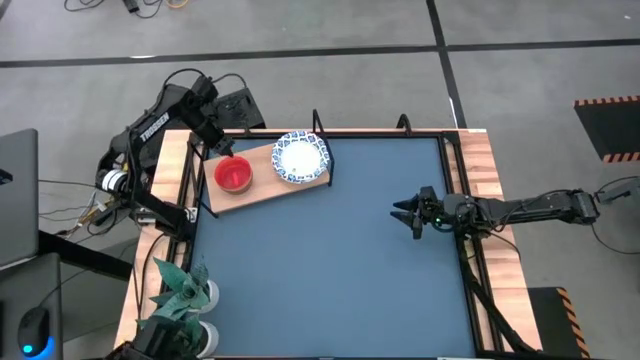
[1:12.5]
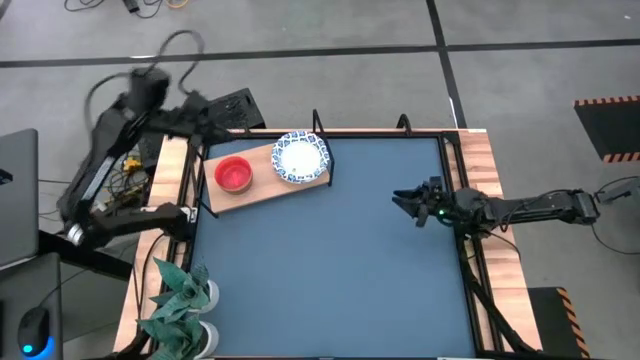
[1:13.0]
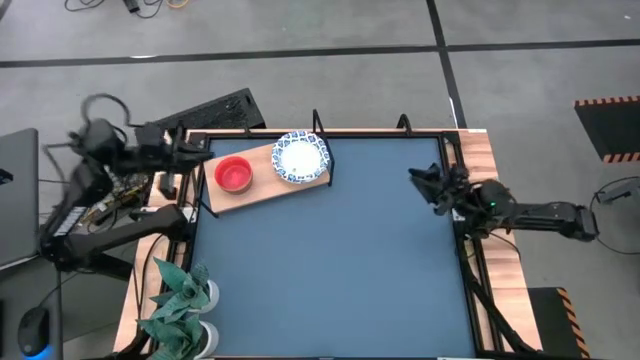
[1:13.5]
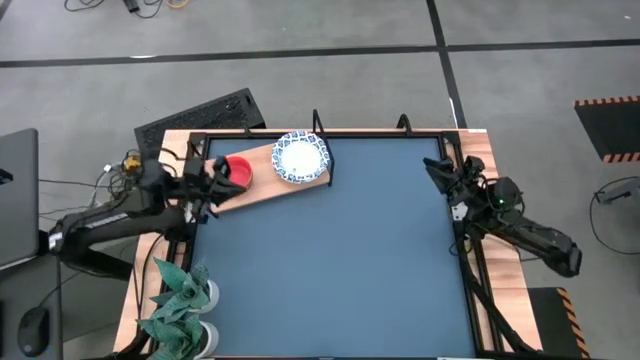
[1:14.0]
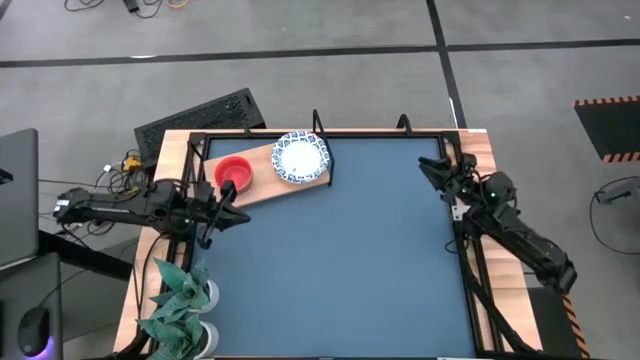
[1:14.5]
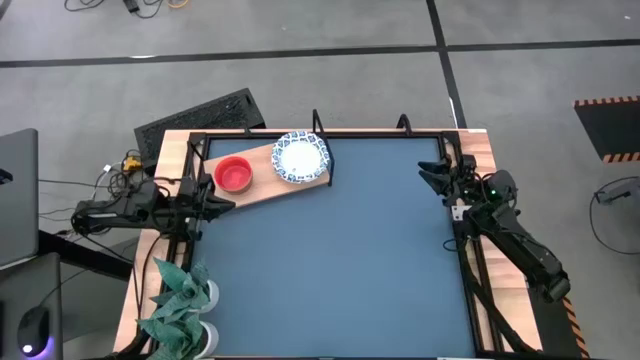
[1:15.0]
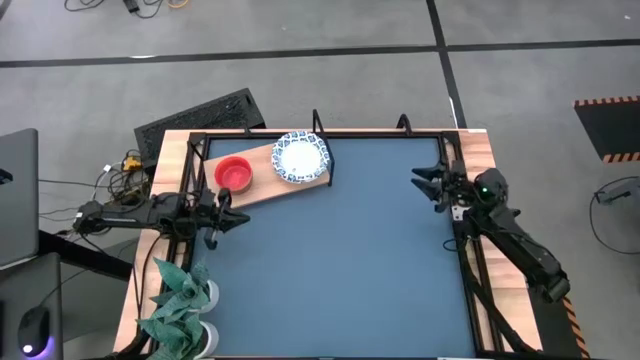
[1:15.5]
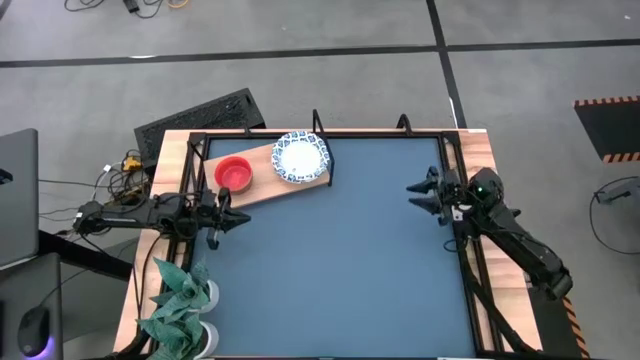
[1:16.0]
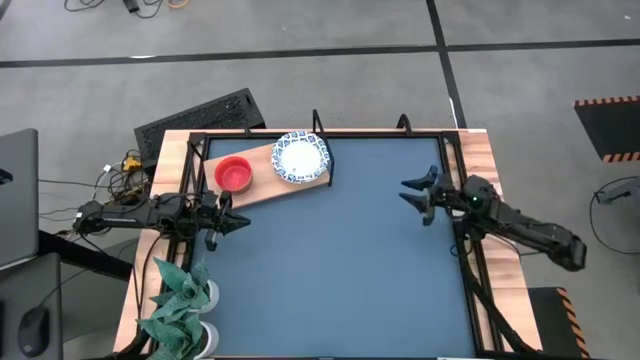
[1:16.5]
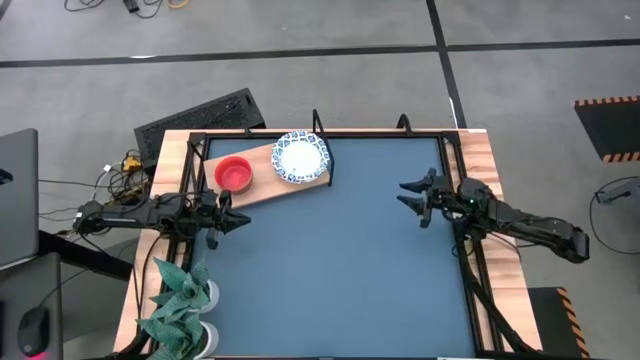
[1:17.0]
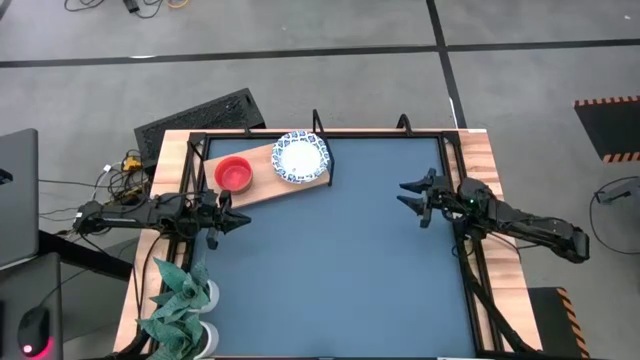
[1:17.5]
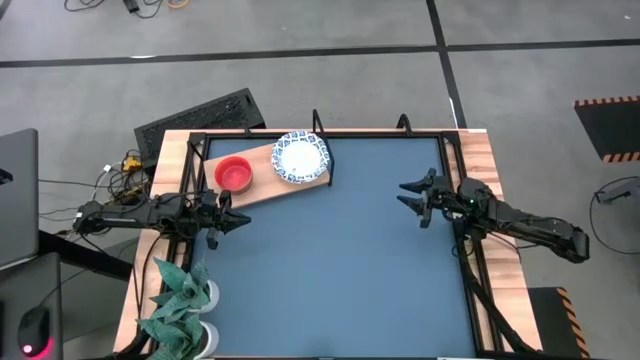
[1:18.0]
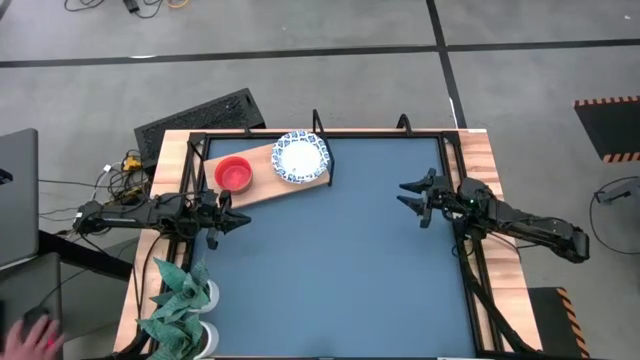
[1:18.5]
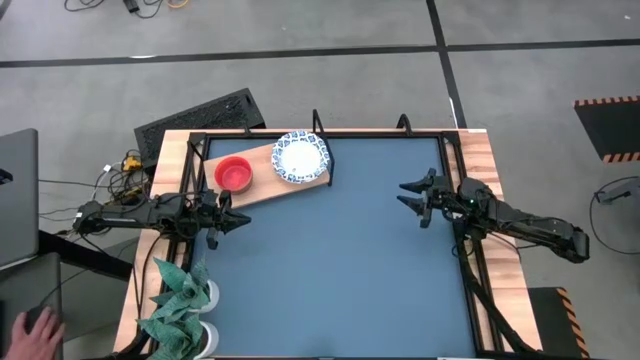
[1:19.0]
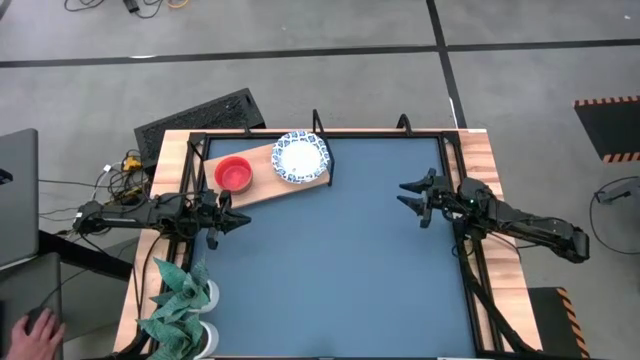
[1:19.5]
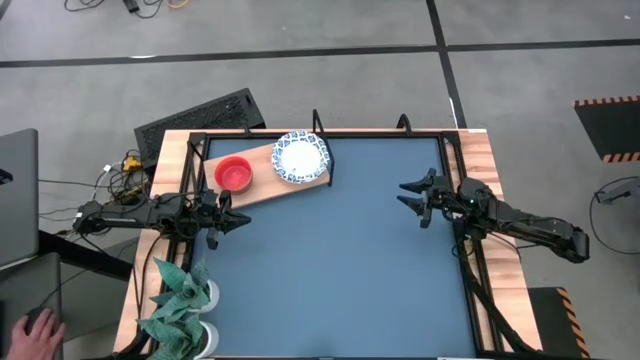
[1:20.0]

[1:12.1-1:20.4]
Task: Place and stack bowls onto a shelf
Return to Home Position

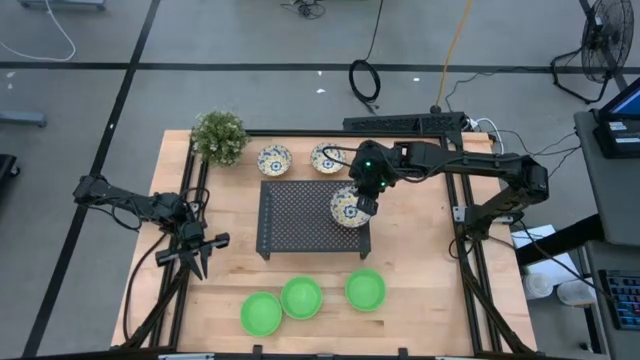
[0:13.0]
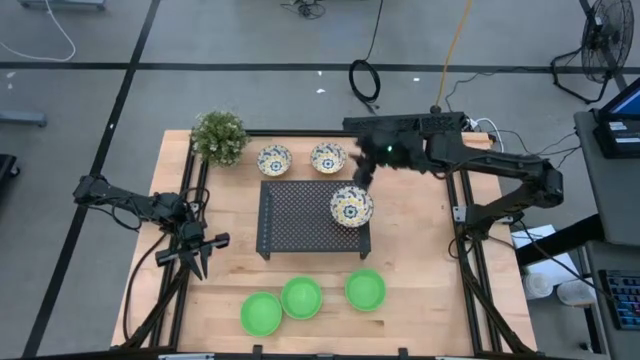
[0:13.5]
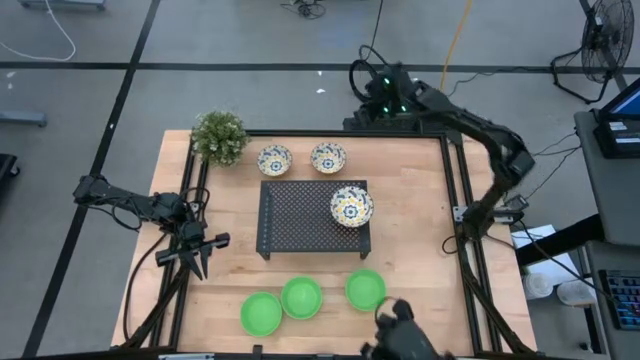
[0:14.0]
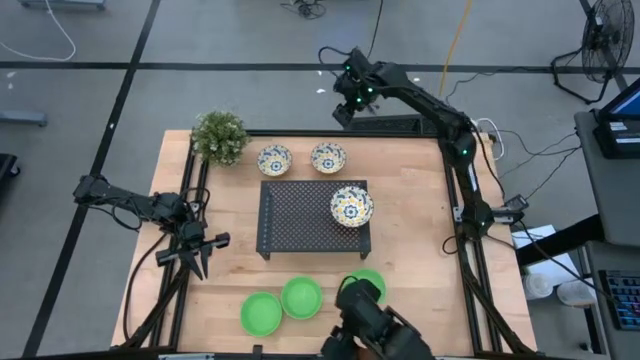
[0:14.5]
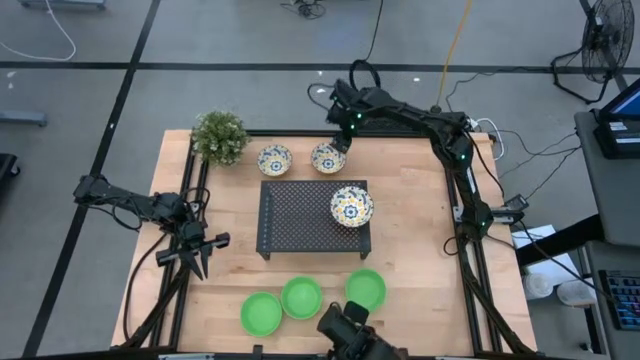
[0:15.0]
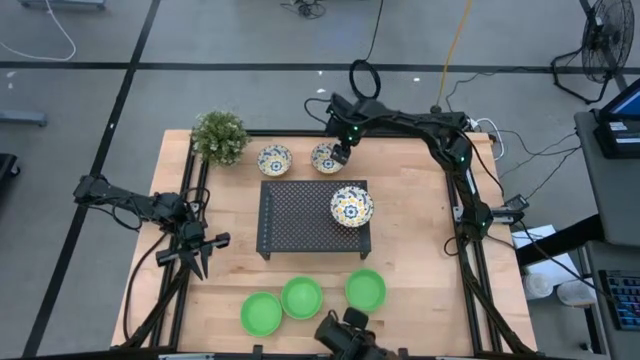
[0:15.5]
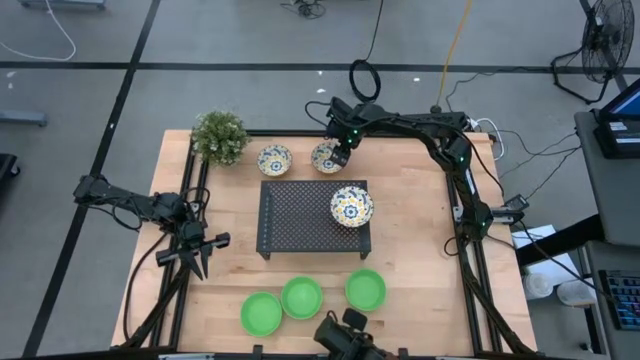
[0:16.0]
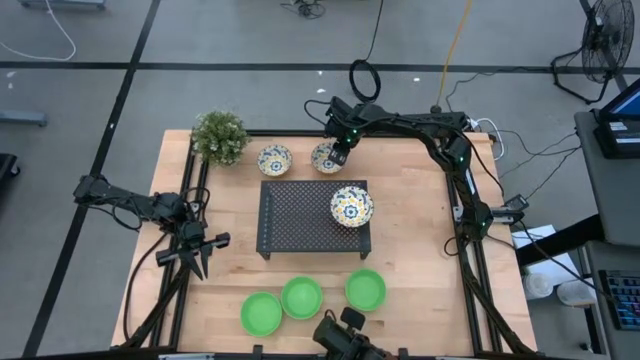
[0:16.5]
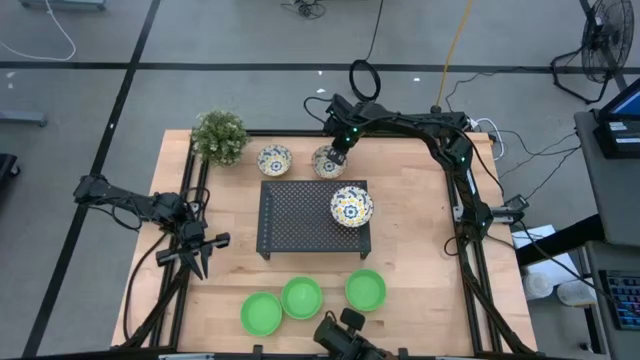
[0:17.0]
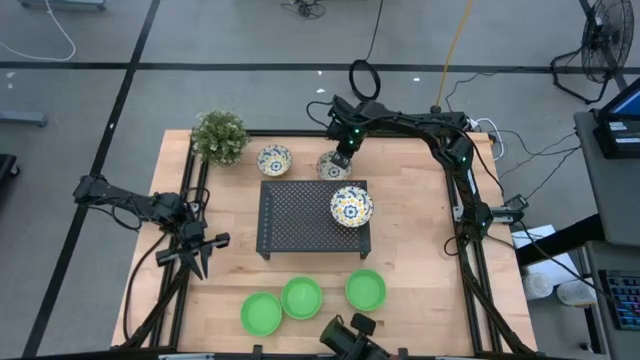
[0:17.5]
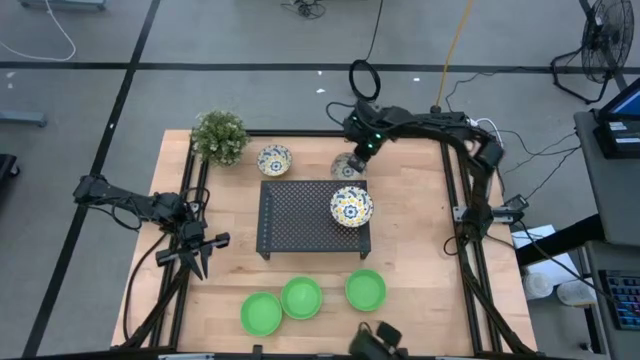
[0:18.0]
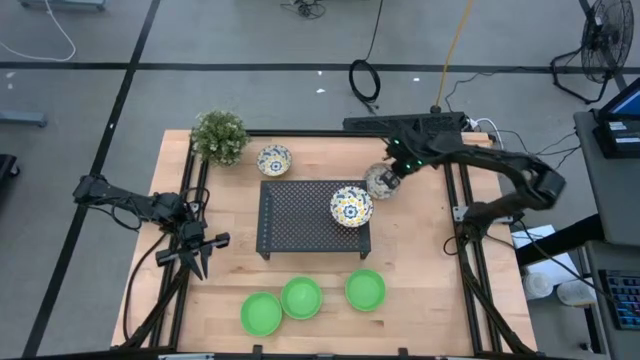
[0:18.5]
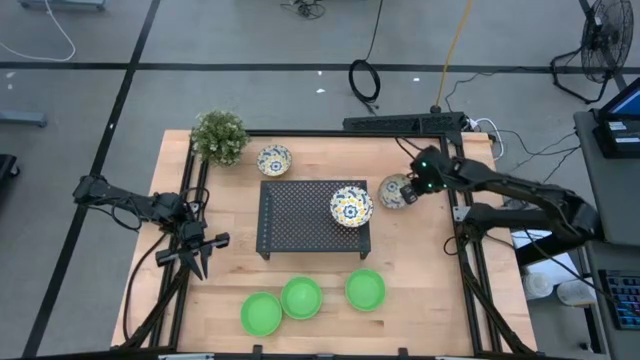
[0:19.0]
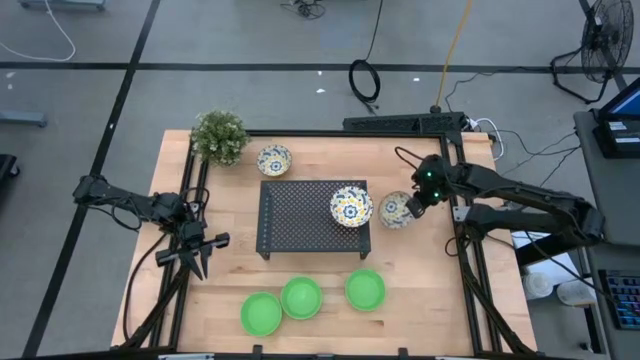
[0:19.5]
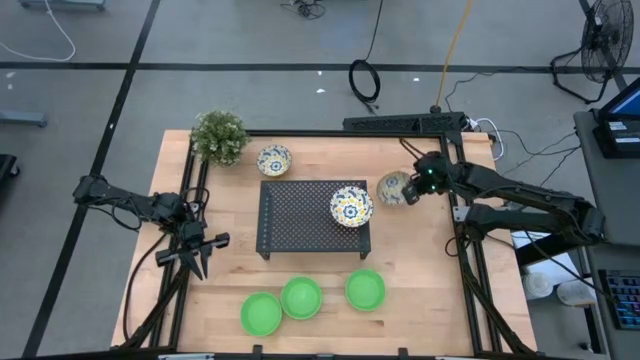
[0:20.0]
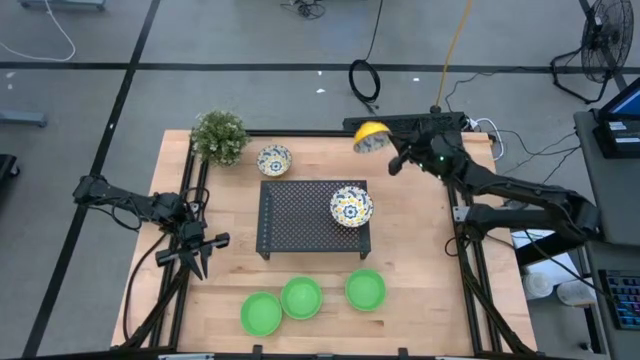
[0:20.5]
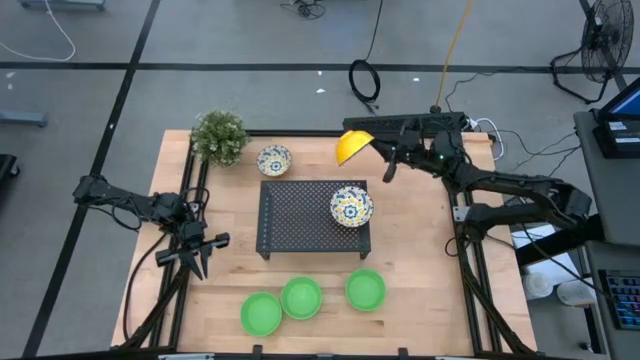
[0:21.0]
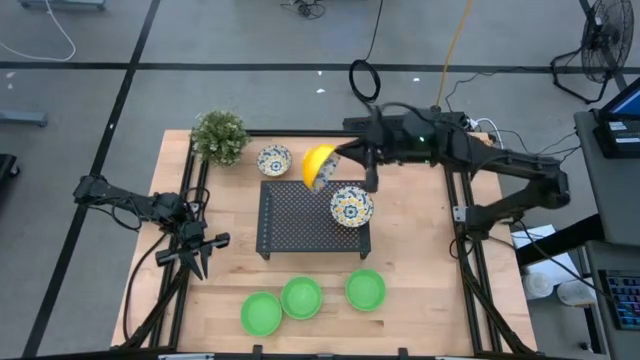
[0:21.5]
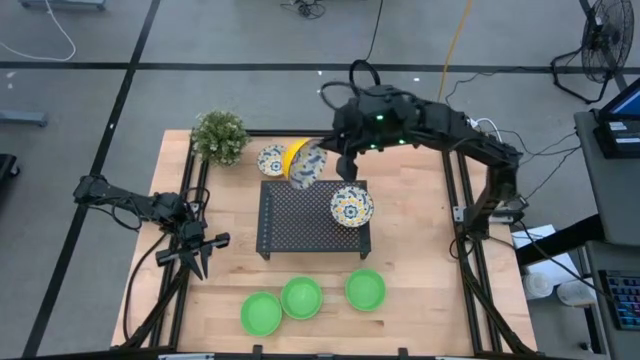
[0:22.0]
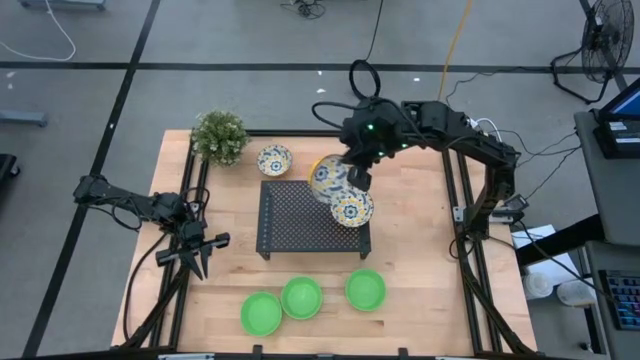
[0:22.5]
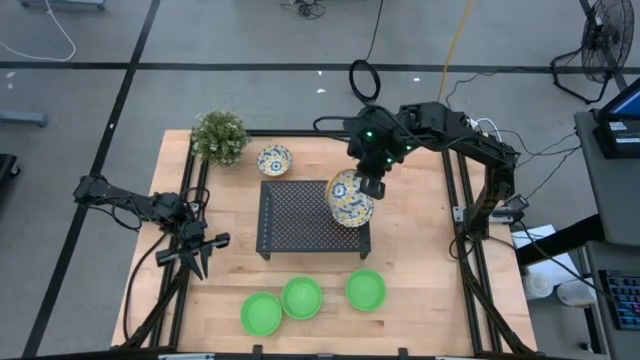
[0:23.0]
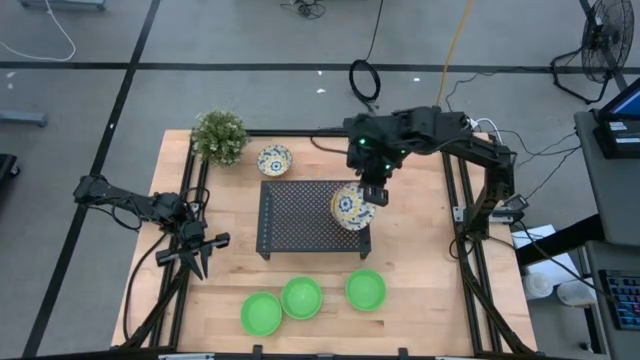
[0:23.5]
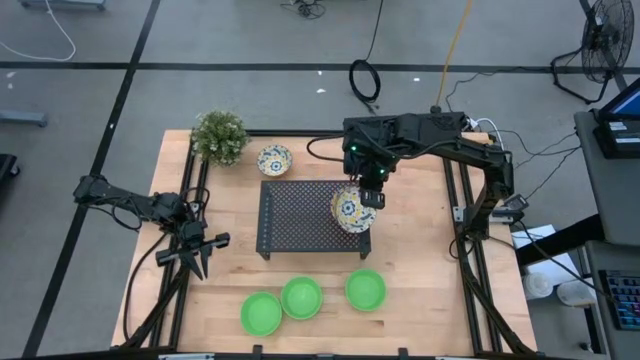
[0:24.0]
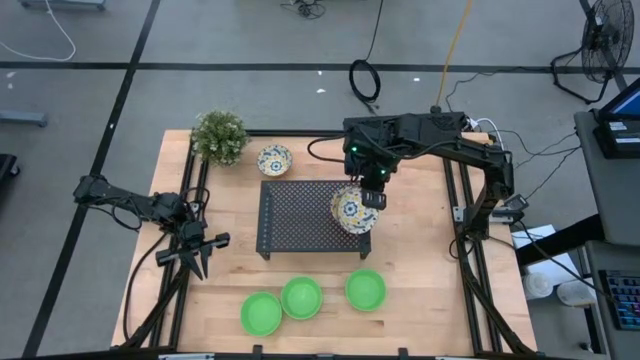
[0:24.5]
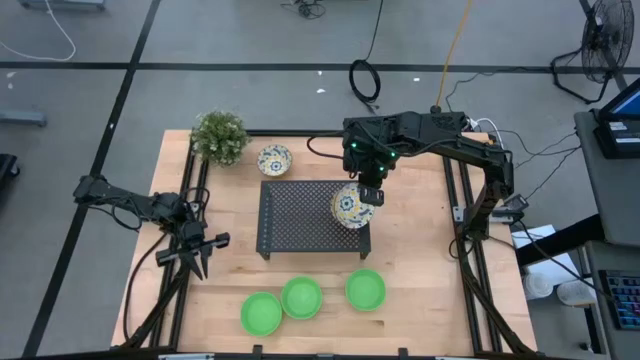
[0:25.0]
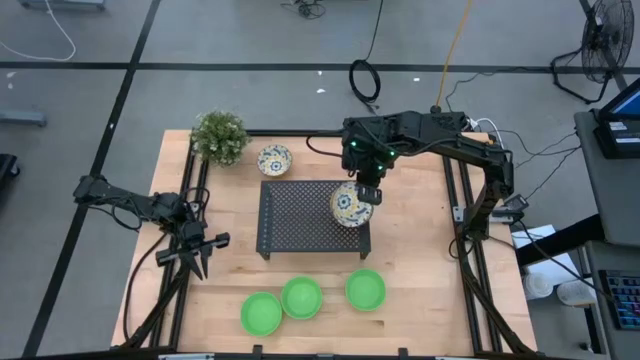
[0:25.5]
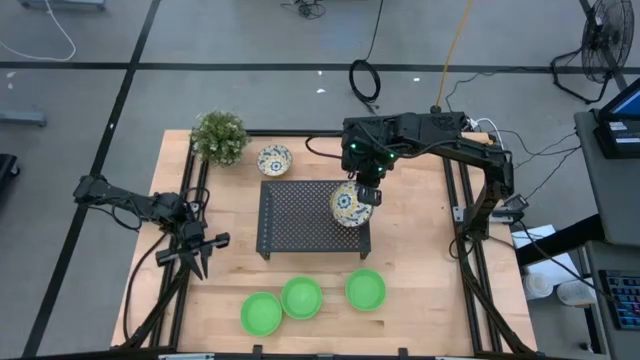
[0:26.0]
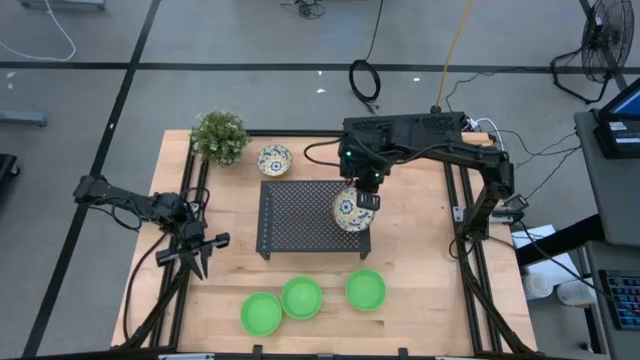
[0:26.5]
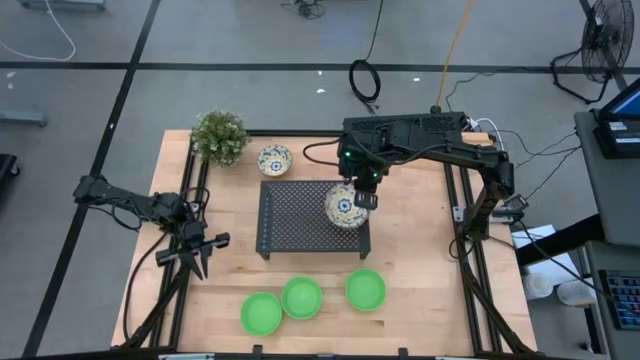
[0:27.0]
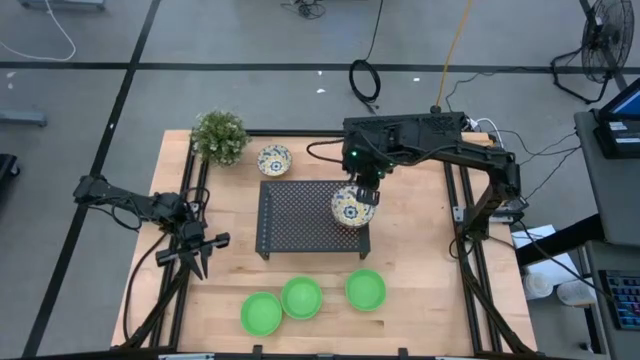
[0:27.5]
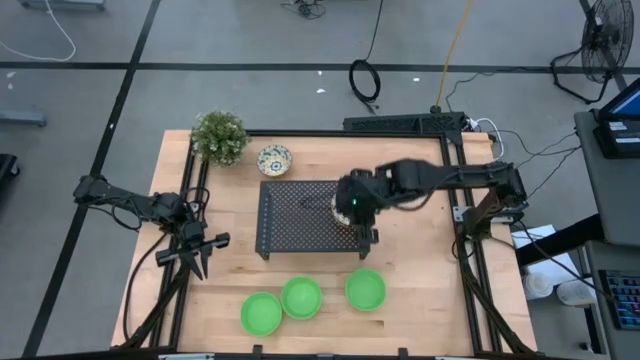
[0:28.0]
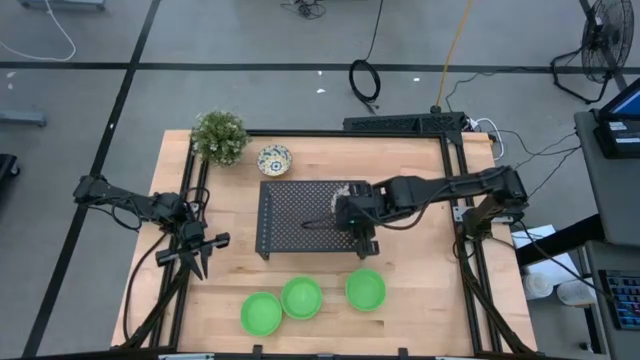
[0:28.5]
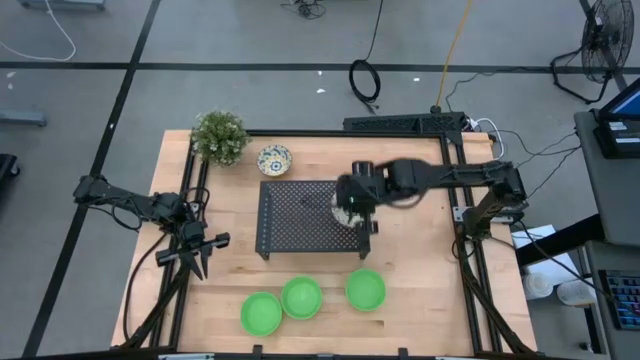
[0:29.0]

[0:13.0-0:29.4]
Task: Pick & Place Mini bowls
Stack the right white patterned bowl on top of the white patterned bowl on the shelf
